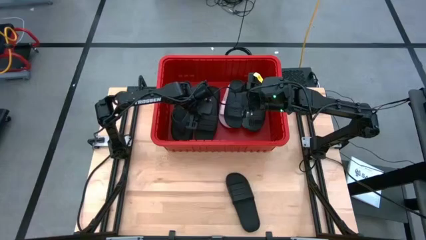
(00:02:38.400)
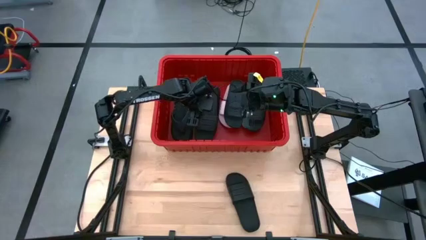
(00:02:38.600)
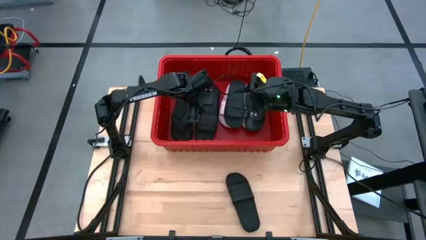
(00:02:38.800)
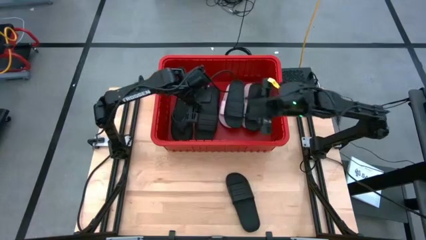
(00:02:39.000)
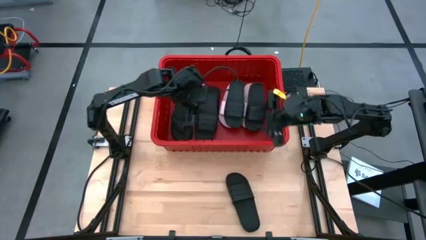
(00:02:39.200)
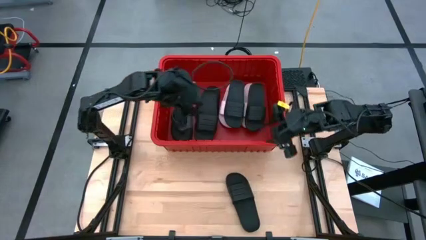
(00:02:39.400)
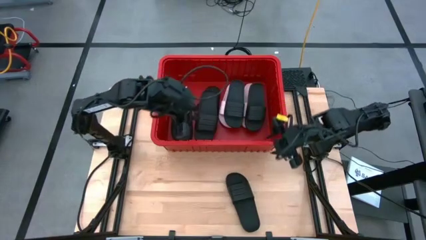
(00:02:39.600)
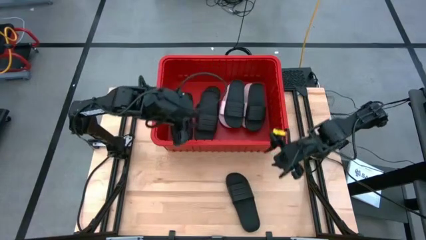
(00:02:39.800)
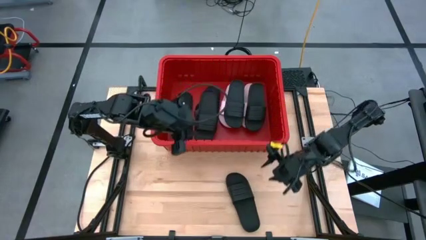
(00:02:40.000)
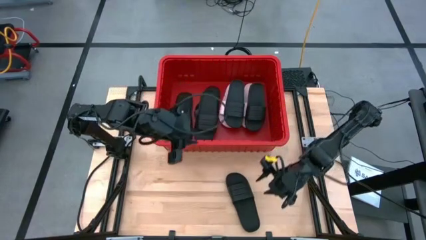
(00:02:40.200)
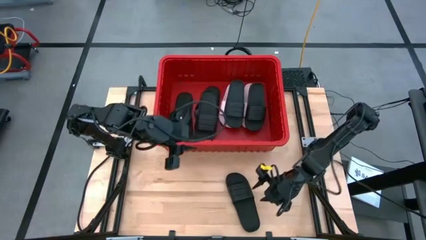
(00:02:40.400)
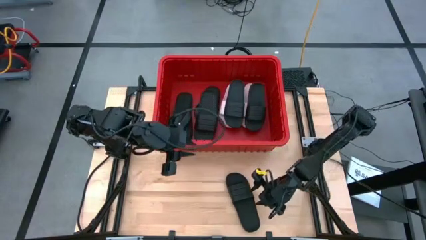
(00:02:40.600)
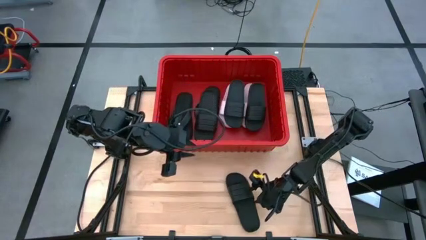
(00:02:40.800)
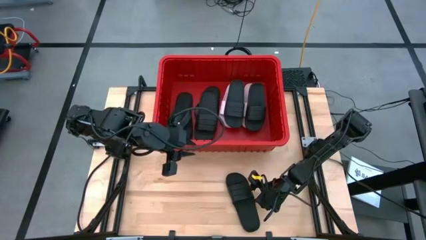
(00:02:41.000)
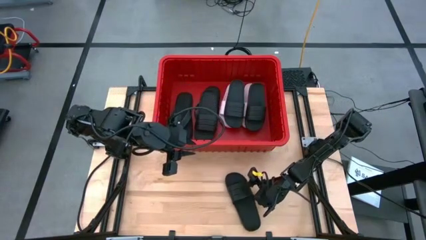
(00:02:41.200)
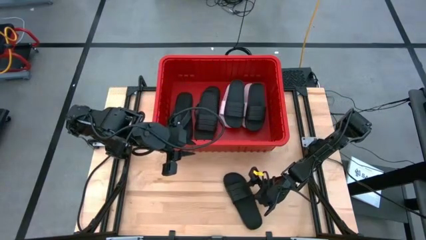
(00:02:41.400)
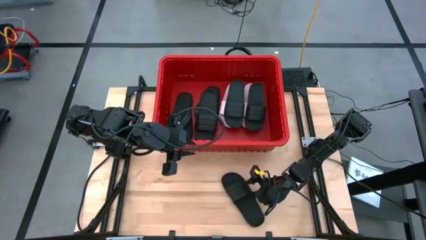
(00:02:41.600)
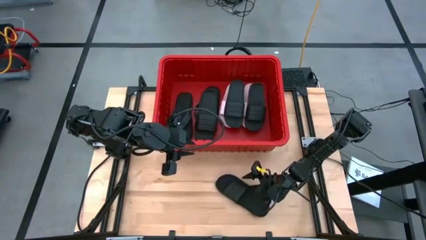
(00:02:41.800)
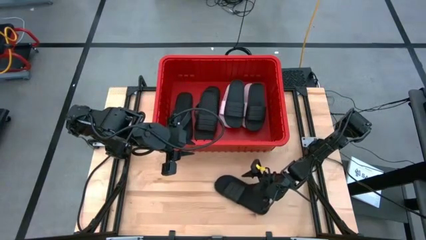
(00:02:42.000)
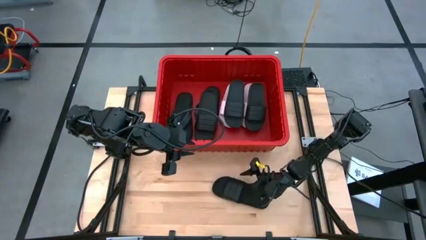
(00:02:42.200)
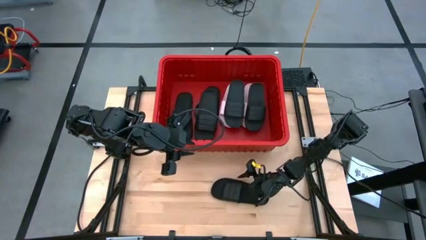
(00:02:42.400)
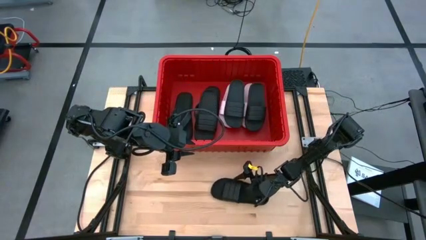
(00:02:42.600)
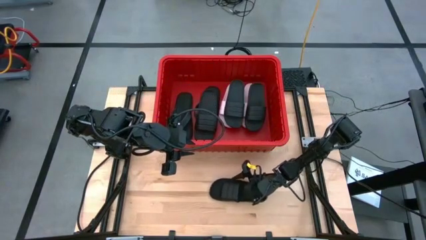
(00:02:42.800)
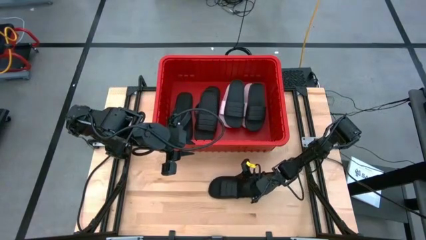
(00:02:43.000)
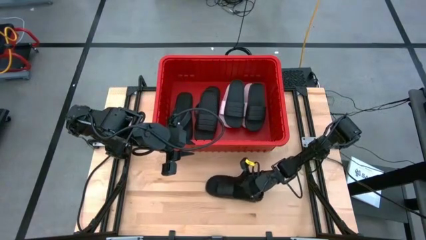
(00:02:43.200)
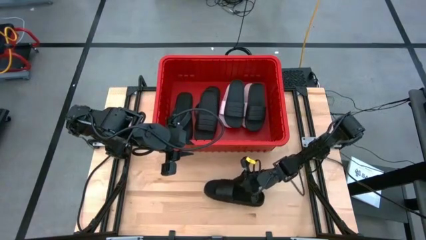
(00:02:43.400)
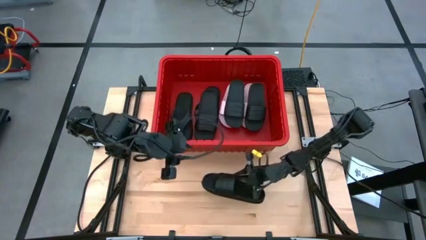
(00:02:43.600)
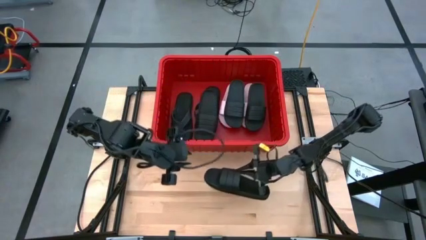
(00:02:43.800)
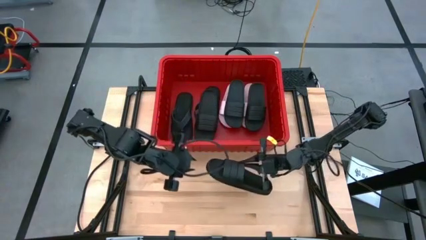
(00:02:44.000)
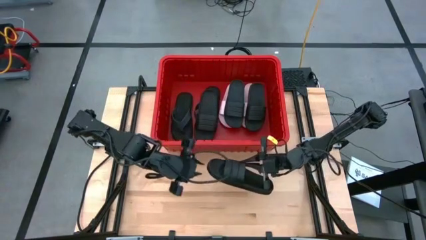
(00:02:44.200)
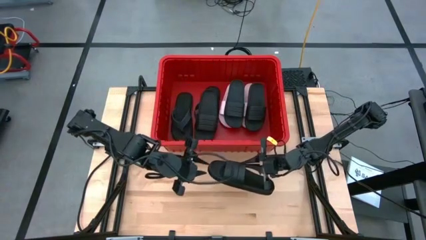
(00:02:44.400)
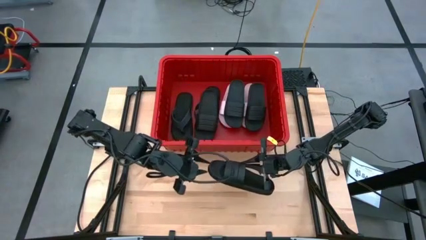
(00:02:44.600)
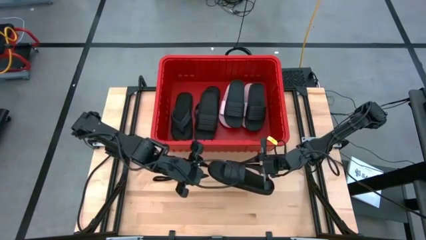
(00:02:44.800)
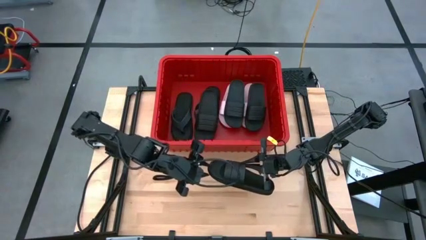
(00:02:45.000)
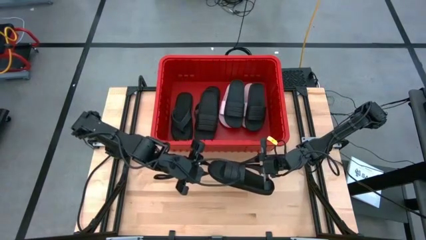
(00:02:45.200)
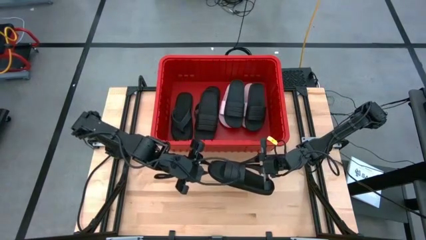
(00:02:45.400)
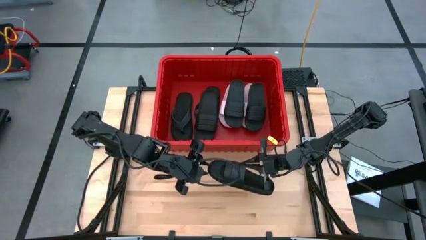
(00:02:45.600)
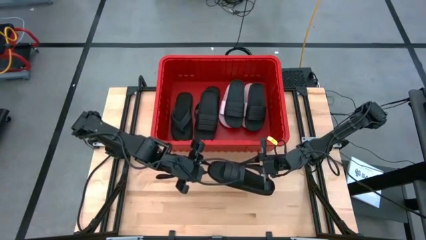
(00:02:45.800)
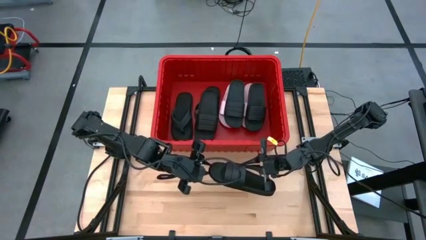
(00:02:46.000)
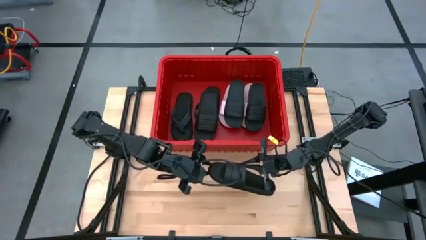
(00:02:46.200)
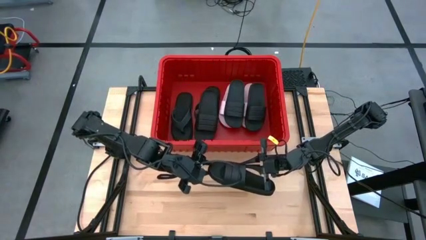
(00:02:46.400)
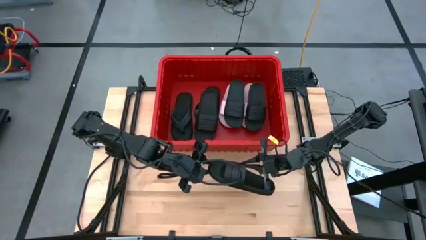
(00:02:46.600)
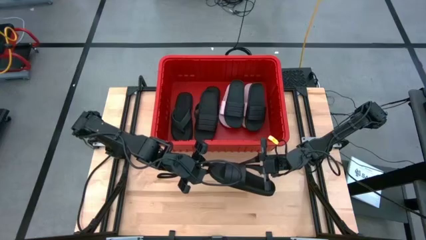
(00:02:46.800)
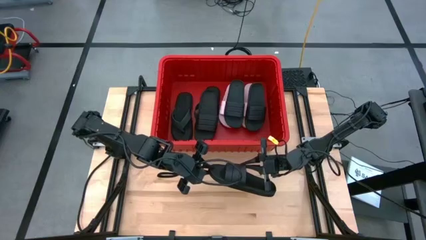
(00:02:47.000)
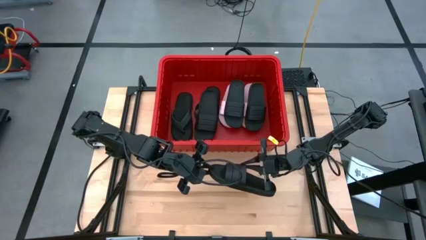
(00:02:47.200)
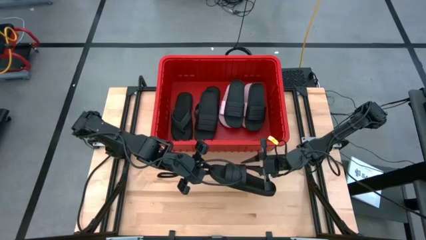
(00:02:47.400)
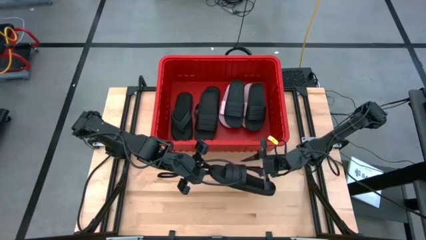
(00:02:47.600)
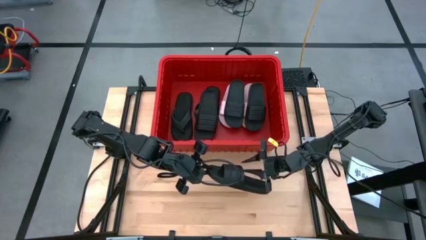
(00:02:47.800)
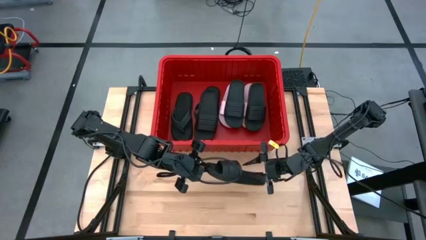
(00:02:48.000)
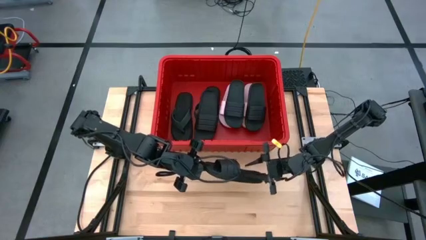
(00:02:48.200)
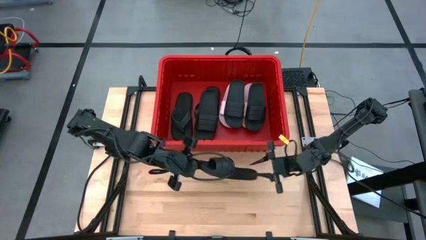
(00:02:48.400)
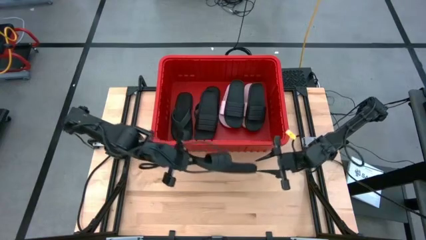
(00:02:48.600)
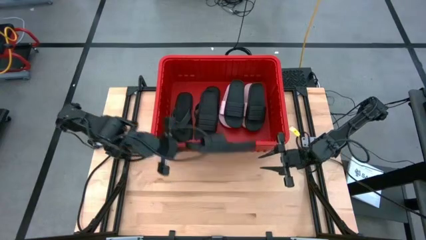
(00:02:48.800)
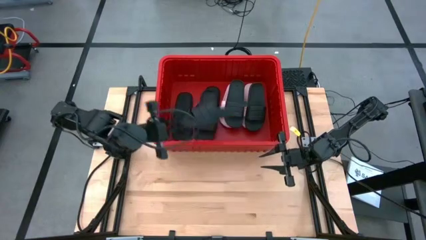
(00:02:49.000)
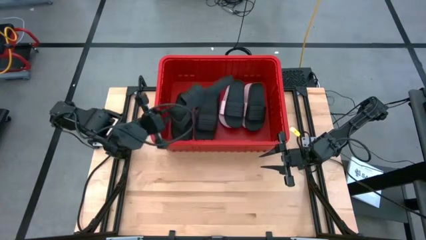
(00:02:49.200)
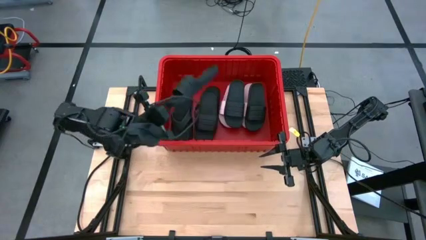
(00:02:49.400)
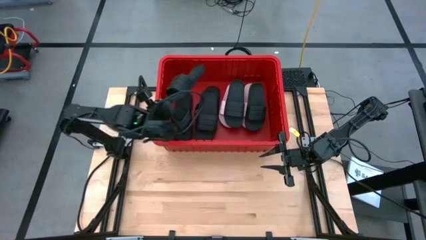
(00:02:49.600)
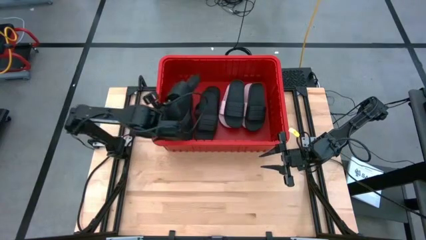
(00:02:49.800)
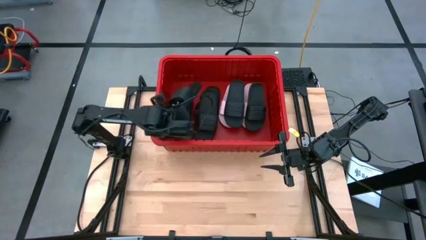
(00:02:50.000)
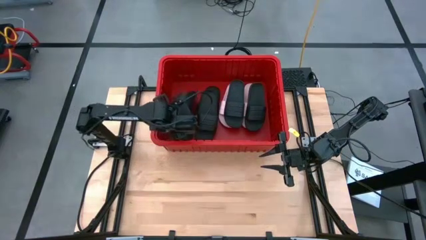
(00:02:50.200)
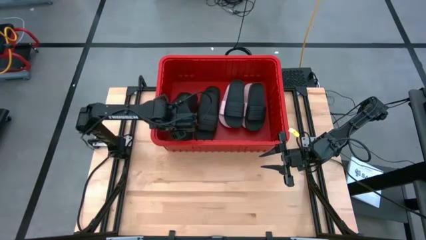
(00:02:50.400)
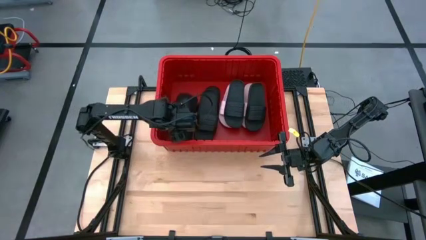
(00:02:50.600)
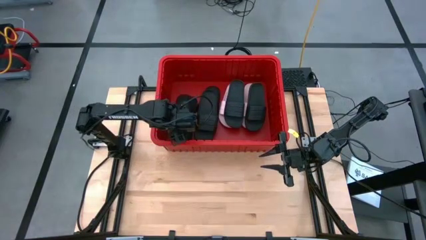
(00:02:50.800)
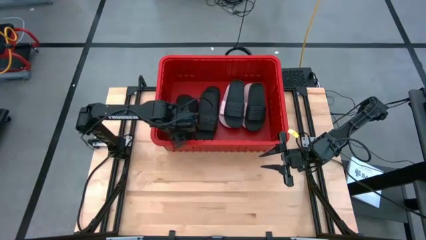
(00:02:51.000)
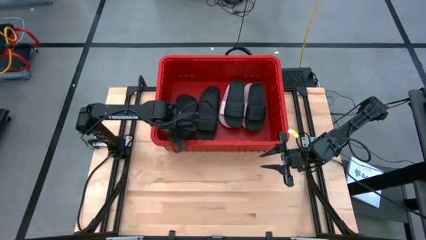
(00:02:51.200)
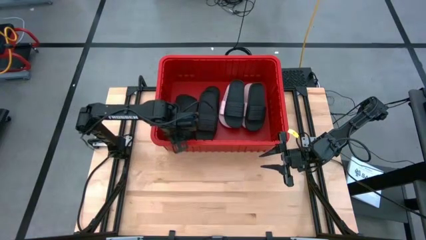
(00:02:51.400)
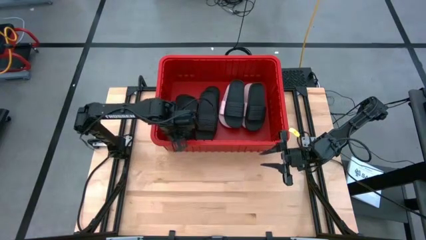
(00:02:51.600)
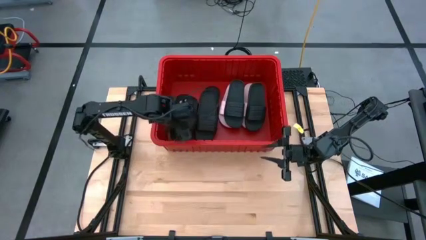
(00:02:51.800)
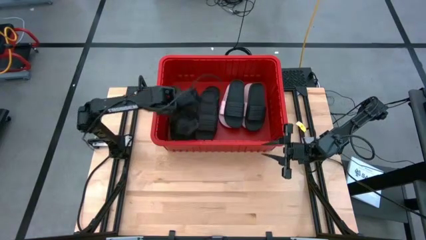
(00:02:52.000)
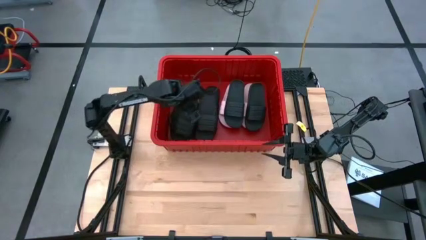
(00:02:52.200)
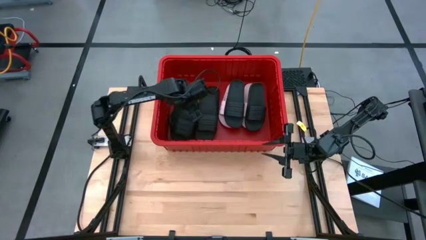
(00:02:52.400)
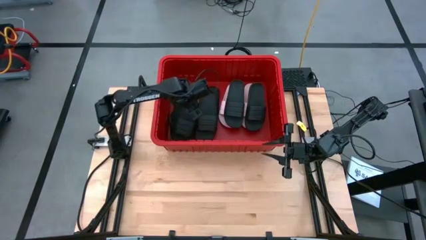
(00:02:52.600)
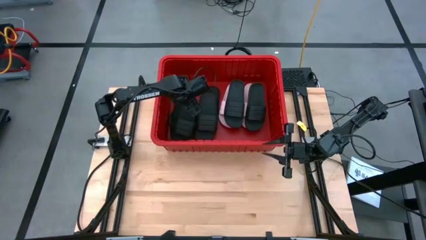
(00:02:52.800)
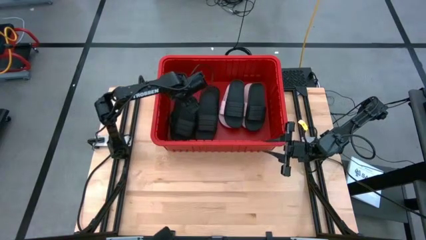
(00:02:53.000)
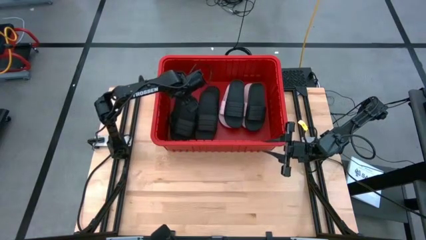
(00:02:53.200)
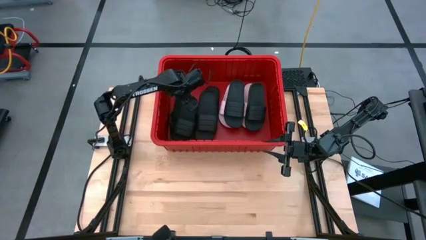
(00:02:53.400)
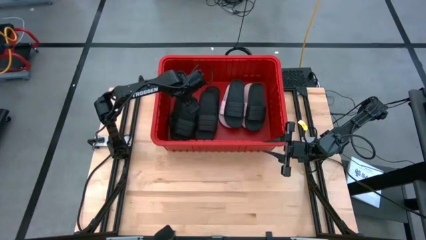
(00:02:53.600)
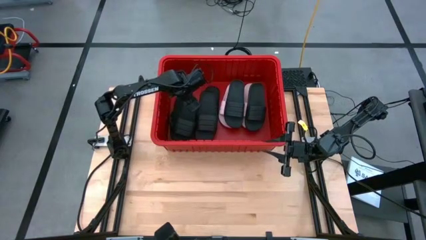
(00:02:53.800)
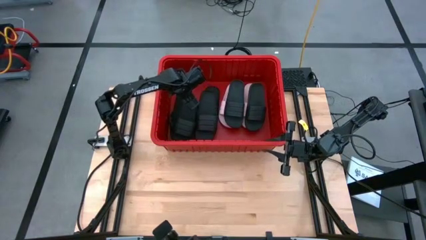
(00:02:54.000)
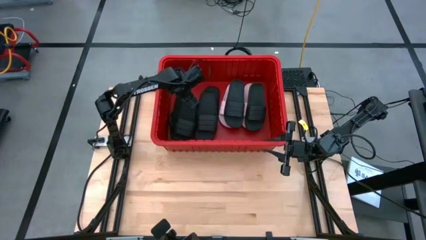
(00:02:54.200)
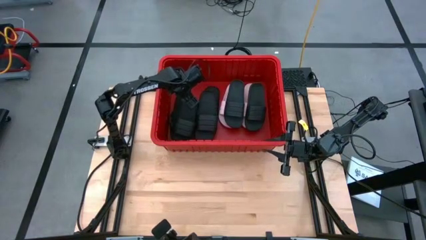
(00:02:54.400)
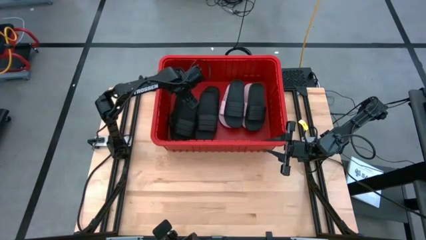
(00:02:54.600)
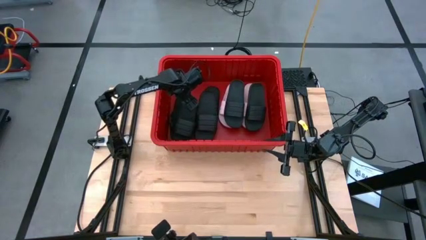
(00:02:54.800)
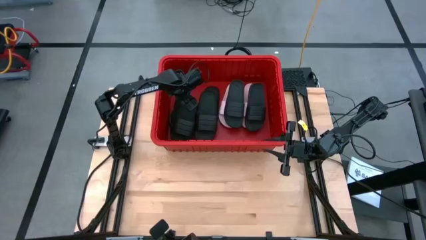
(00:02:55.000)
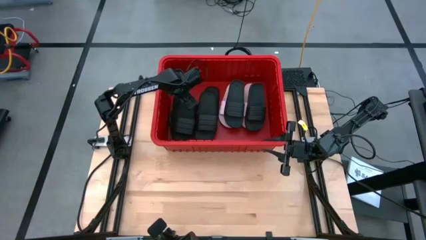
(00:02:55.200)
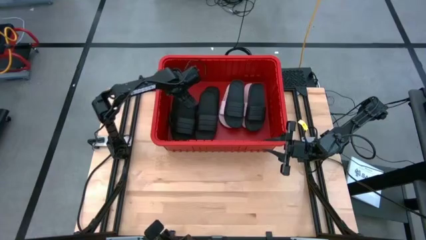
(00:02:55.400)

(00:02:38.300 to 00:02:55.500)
Task: Pick and place slides into bin
Put the black slide into the red bin
